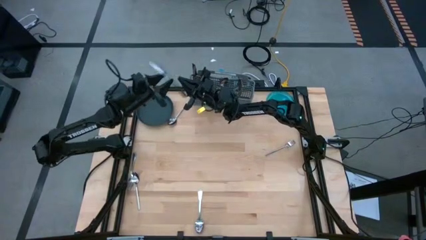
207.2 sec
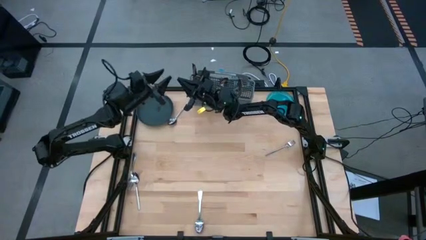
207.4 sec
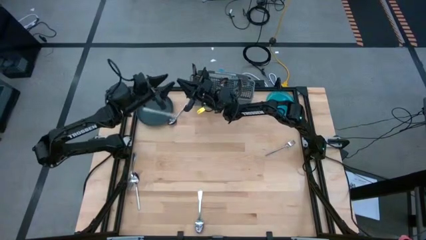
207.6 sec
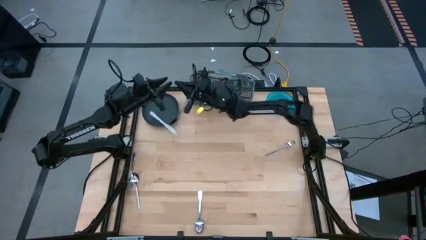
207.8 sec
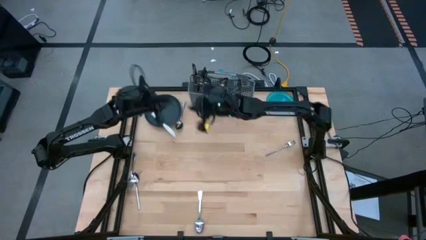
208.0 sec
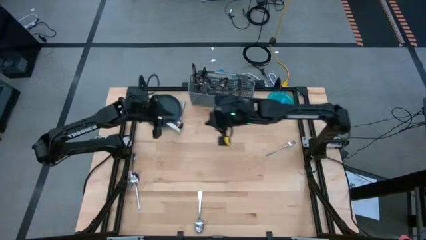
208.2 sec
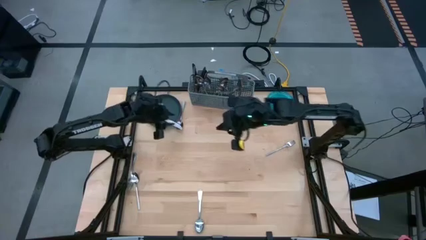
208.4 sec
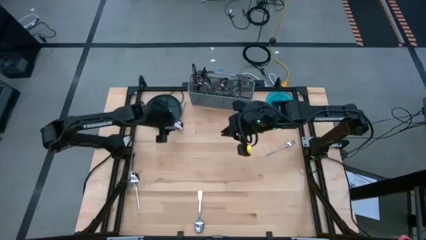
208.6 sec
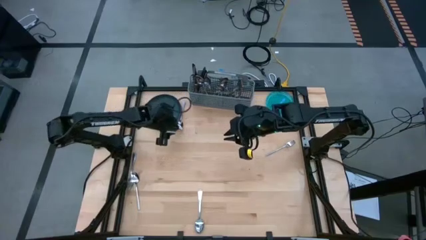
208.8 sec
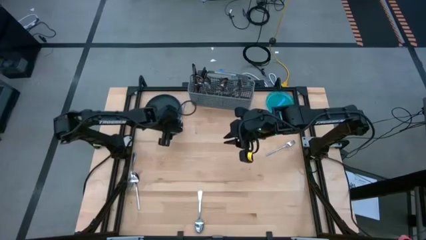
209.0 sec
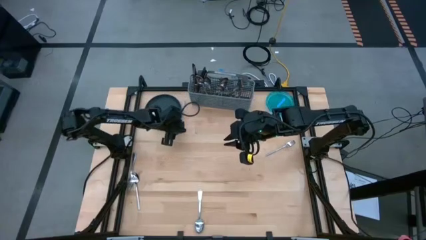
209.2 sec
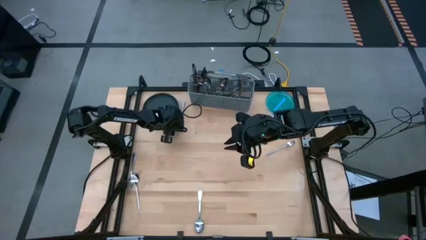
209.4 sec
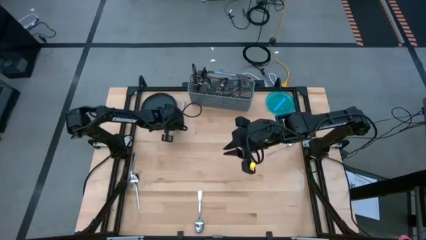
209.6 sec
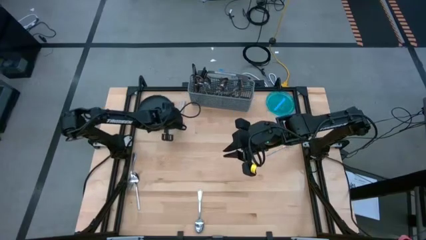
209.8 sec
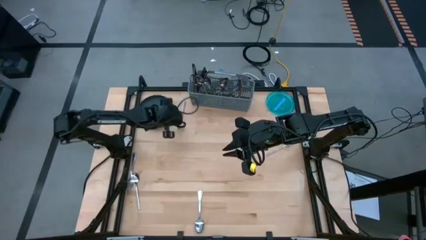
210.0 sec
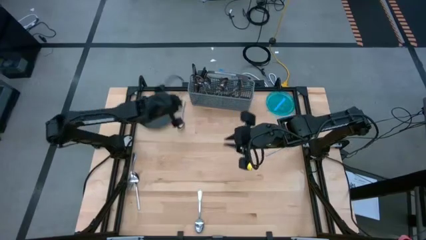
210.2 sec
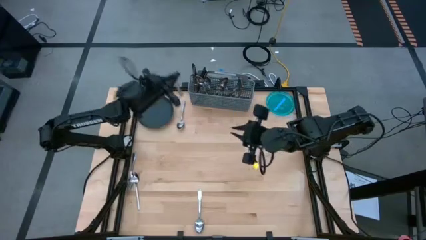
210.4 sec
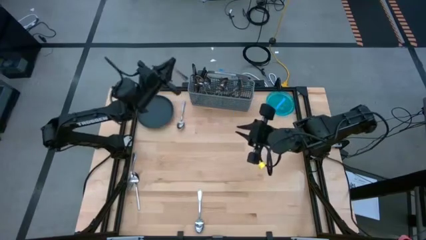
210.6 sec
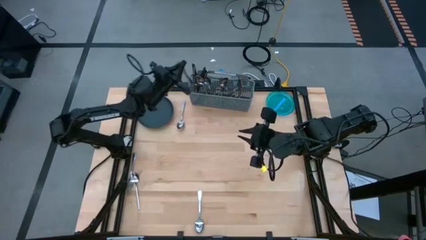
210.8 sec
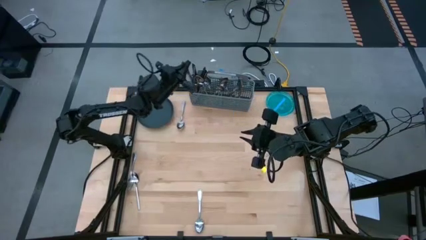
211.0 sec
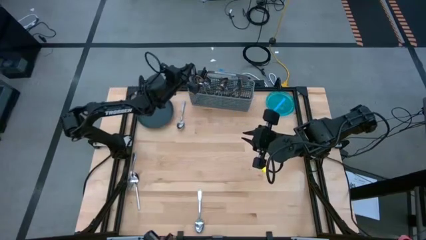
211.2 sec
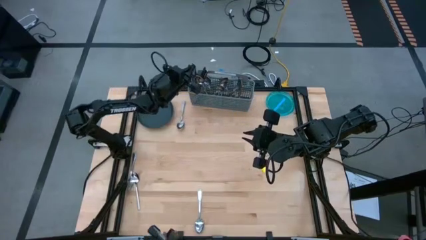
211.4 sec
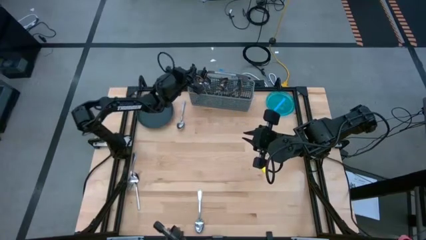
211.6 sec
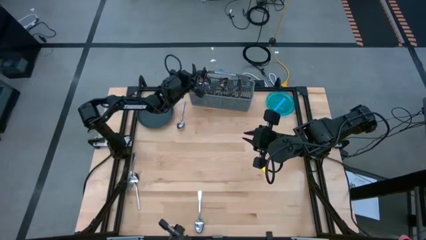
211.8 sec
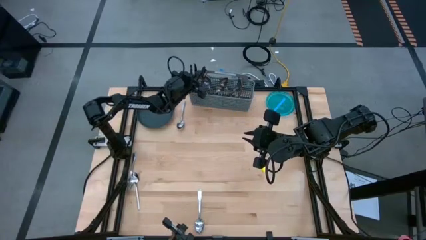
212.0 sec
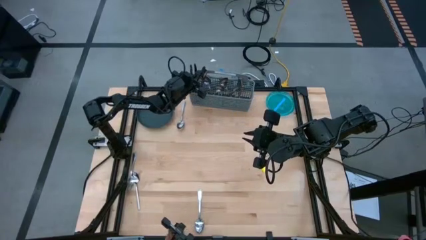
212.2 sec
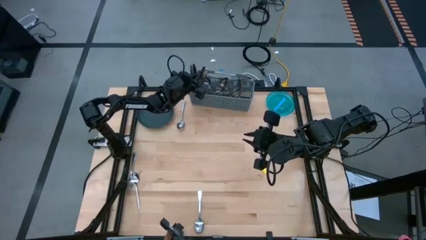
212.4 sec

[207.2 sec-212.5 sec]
Task: Sort silverware
Put the knife into the silverware basket

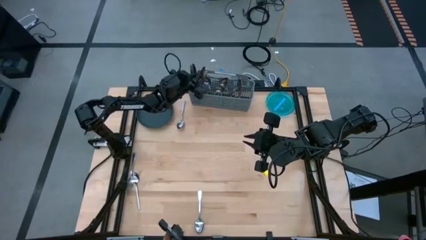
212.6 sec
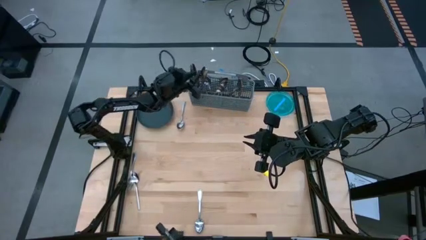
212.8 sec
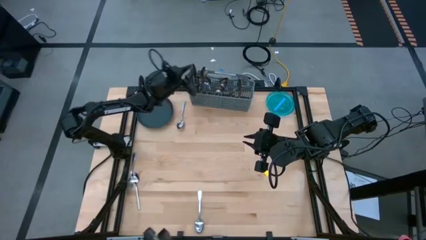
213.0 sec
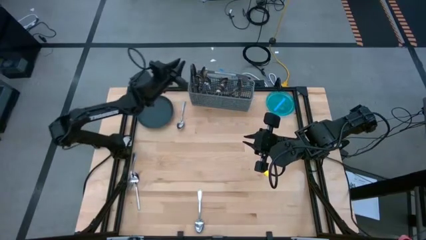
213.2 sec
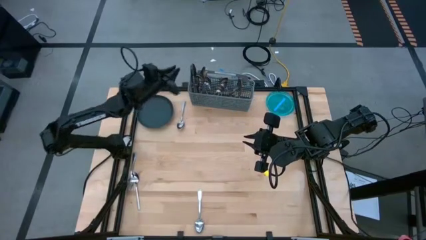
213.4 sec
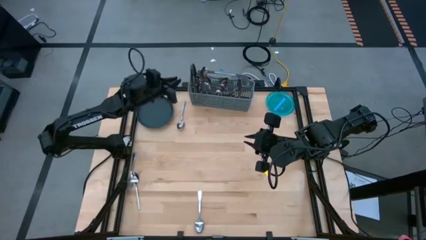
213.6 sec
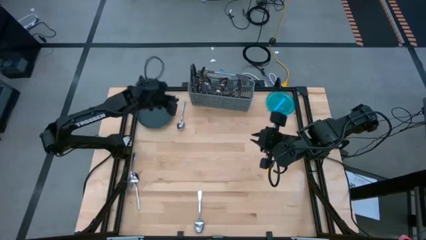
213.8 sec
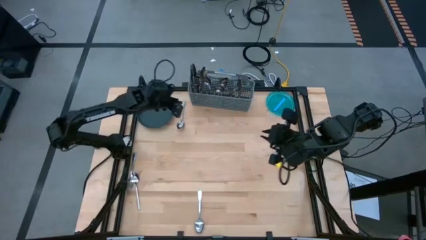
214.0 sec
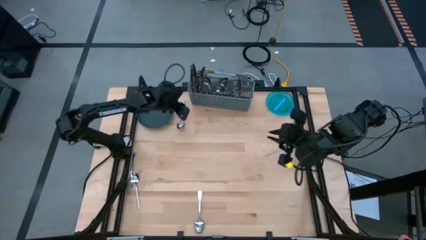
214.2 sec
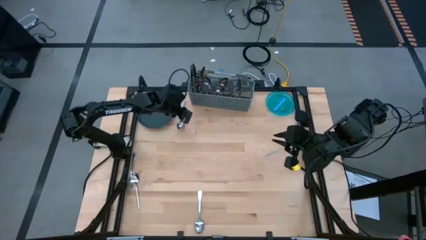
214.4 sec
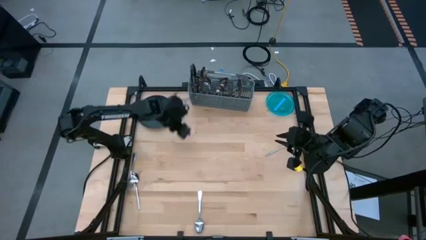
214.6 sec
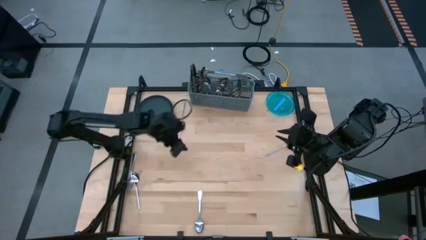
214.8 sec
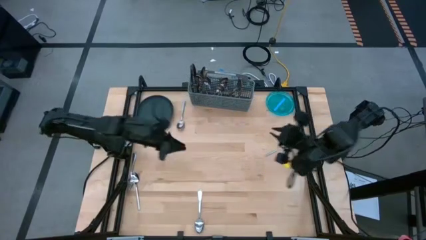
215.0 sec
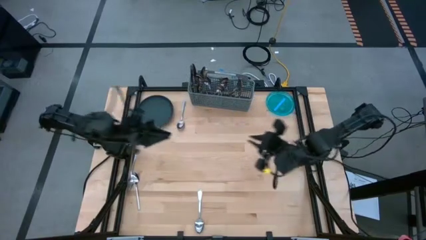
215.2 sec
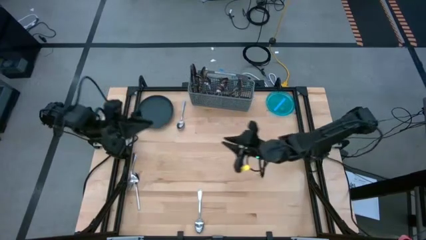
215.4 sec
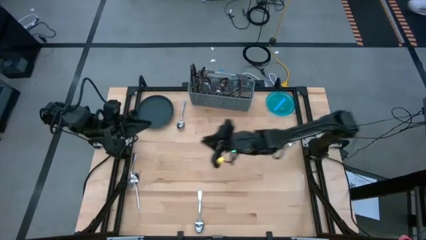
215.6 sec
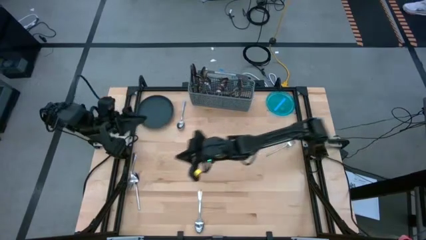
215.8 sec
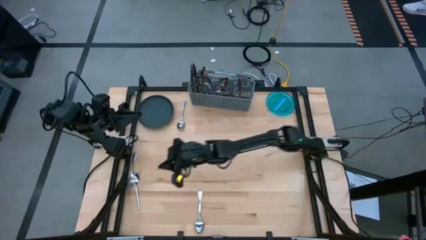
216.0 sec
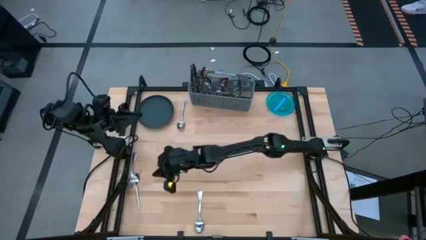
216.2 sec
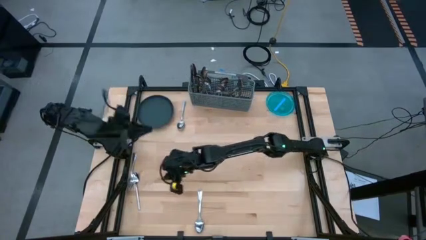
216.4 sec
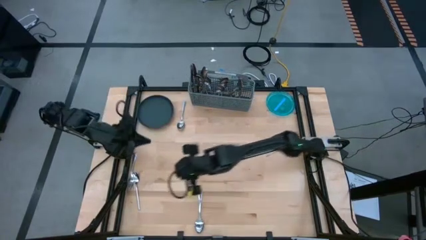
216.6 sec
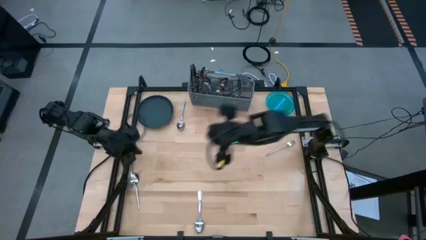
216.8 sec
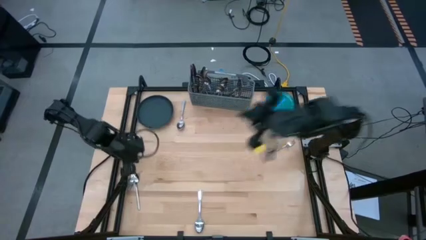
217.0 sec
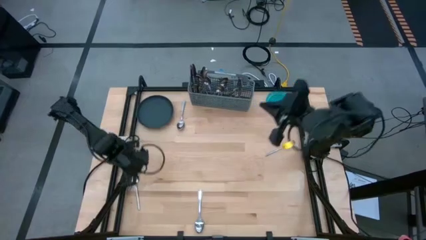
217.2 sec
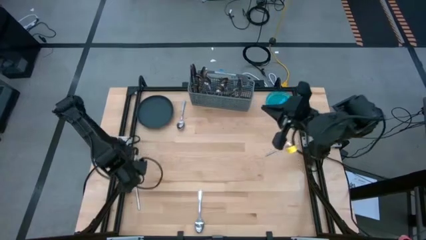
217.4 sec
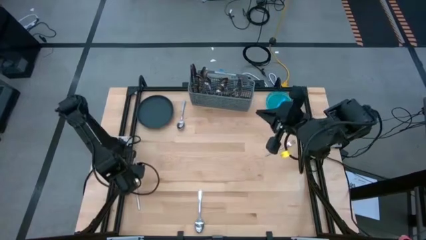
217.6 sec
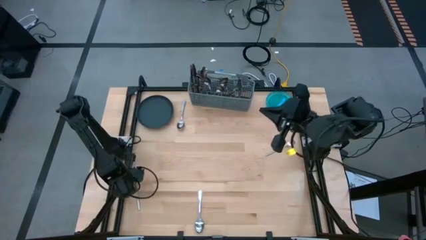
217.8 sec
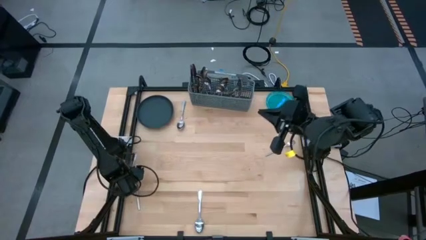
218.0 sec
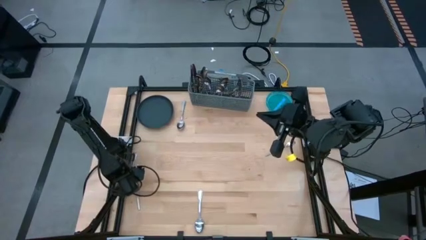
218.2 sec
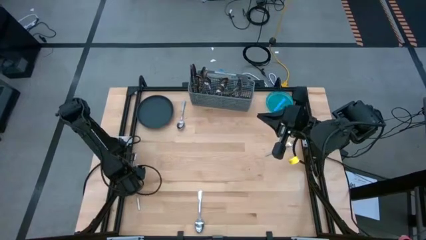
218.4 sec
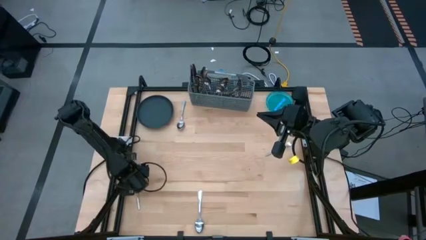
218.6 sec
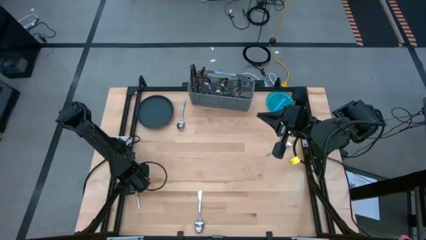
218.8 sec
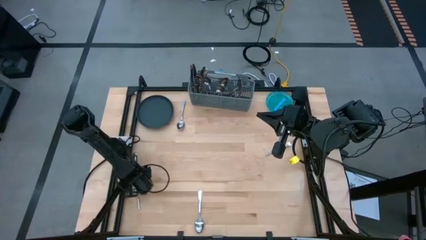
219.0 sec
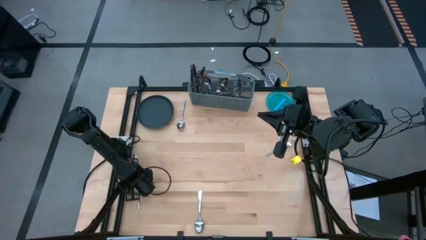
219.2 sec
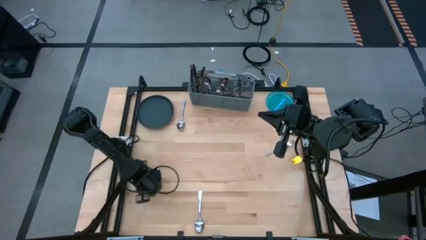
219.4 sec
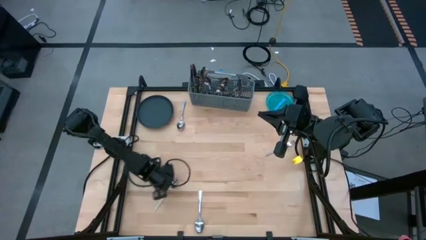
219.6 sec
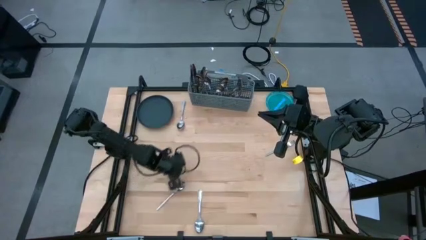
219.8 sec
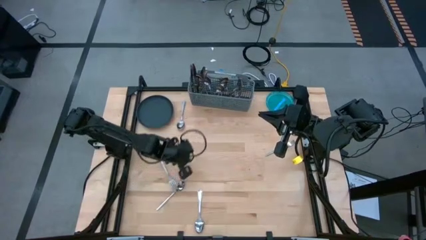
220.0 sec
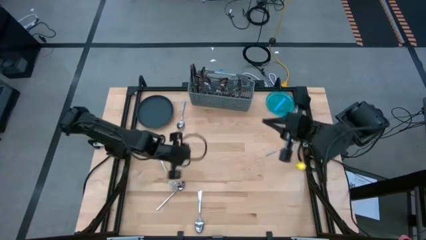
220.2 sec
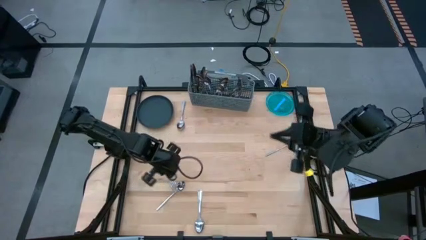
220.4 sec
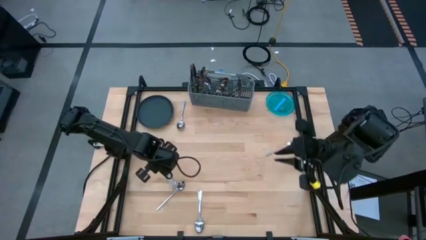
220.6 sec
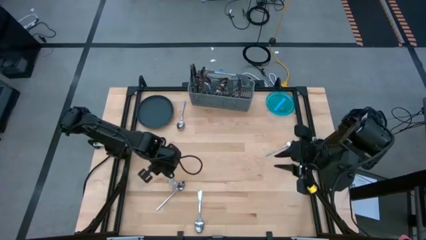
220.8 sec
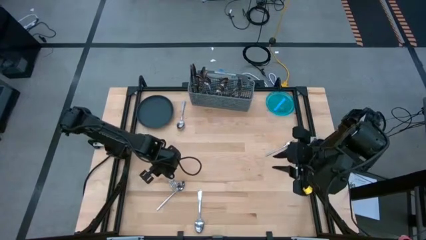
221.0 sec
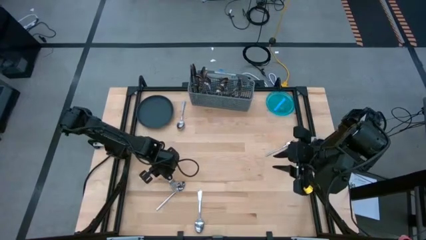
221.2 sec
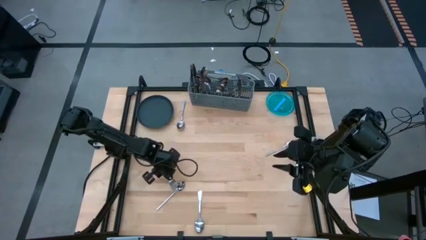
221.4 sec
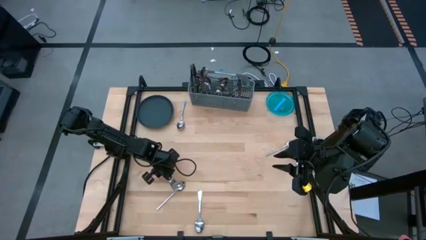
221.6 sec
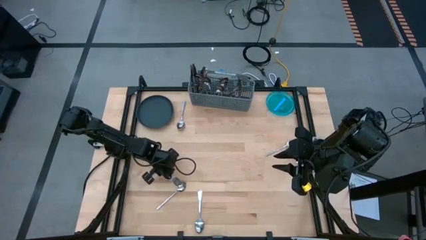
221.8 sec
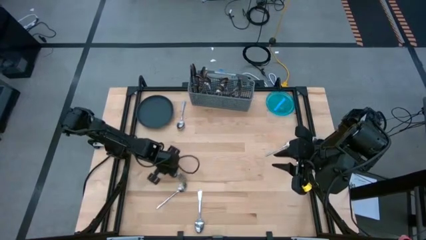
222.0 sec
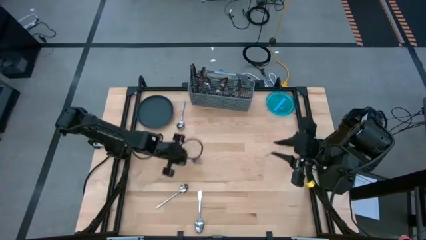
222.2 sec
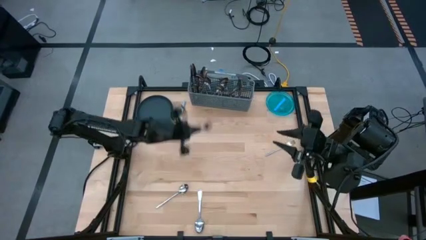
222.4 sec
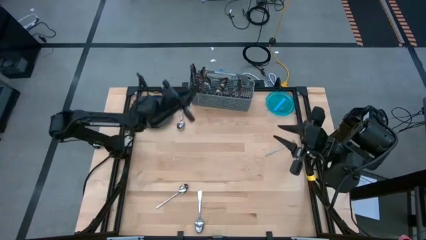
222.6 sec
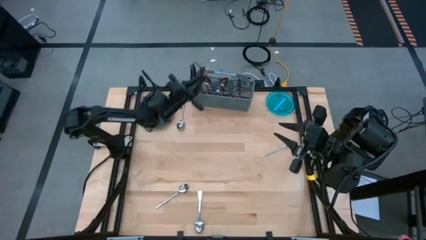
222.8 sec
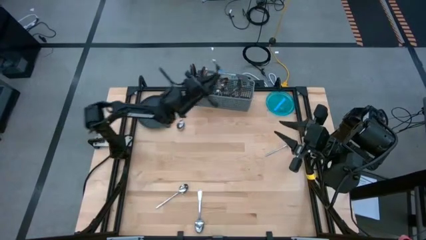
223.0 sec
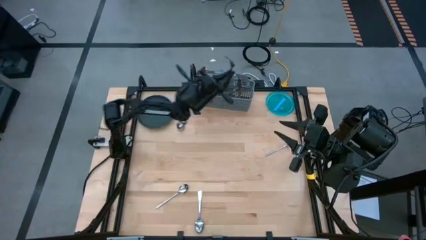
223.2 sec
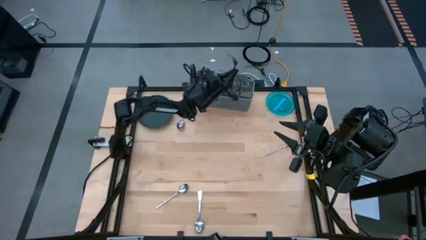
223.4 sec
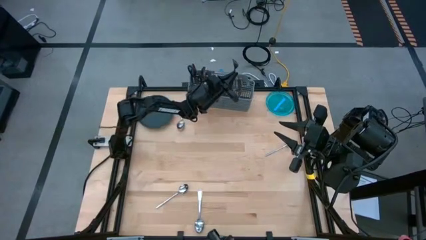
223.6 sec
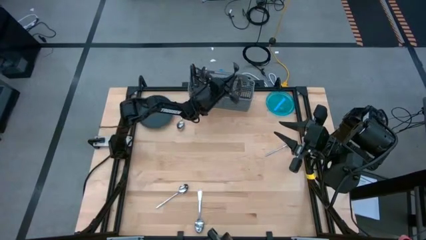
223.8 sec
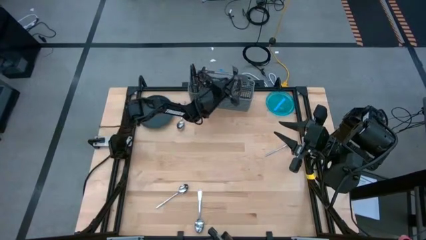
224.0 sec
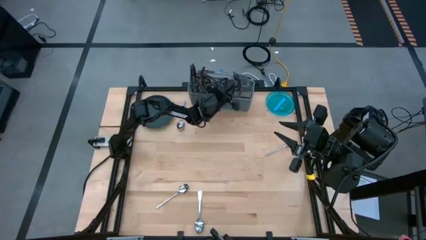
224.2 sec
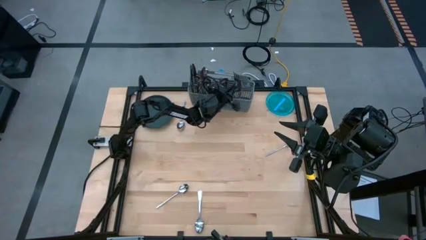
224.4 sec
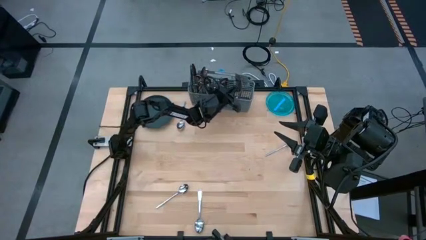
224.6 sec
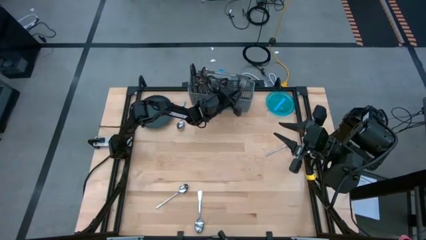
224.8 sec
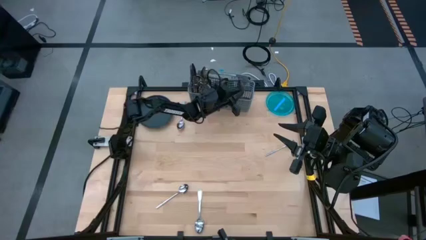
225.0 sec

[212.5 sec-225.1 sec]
Put the fork into the silverware basket
